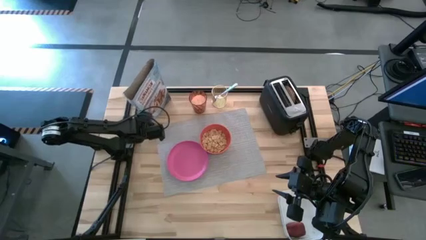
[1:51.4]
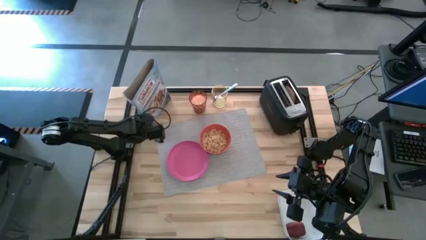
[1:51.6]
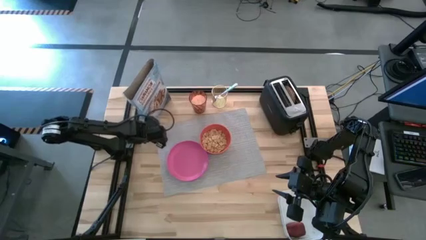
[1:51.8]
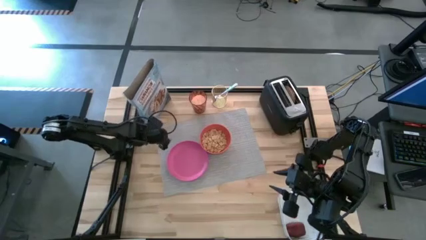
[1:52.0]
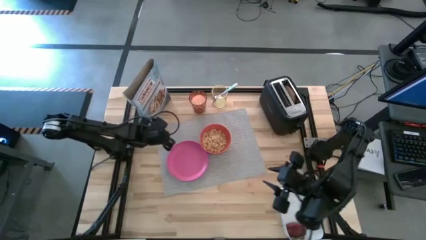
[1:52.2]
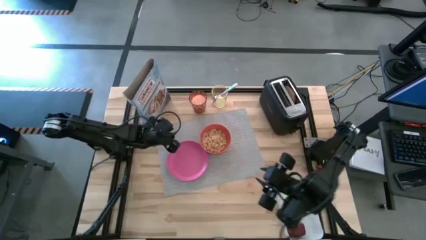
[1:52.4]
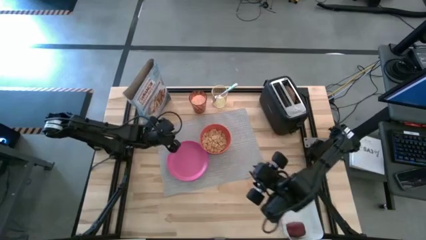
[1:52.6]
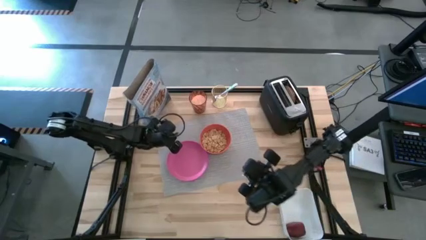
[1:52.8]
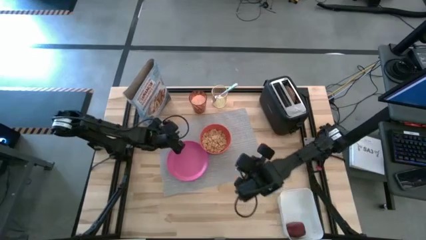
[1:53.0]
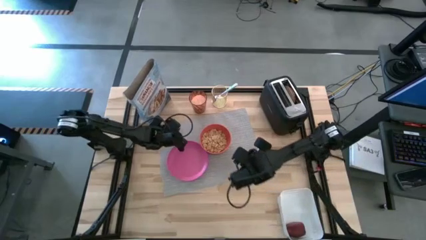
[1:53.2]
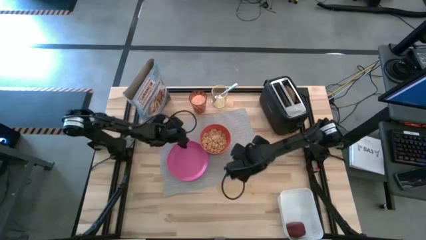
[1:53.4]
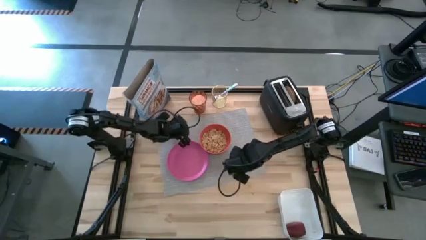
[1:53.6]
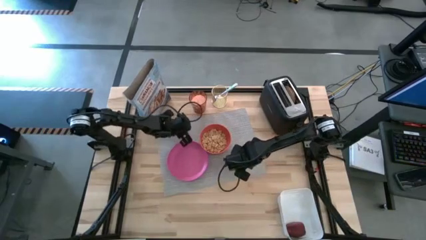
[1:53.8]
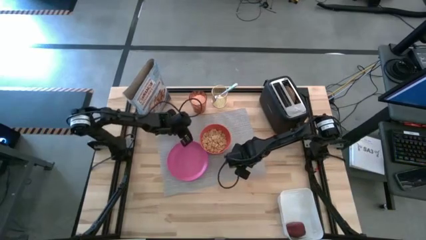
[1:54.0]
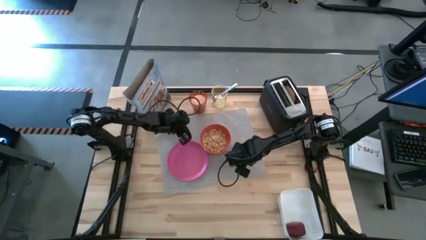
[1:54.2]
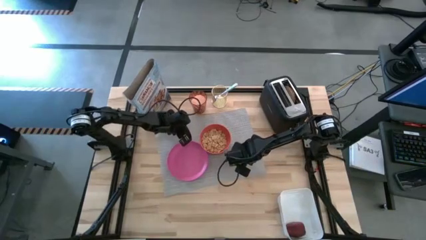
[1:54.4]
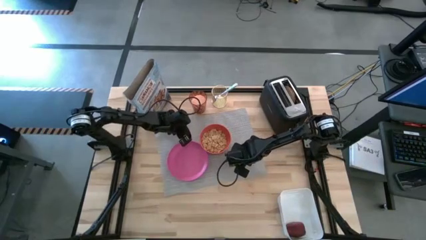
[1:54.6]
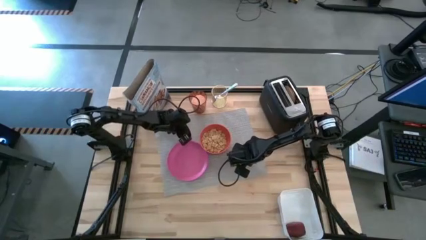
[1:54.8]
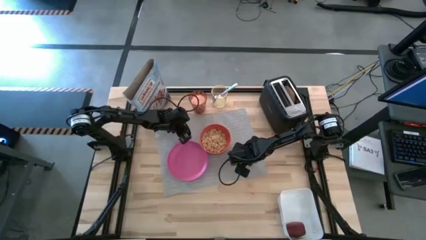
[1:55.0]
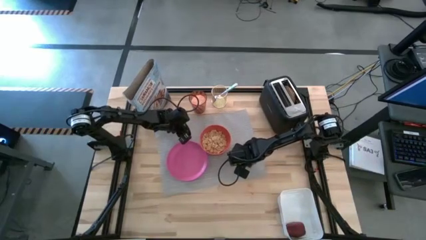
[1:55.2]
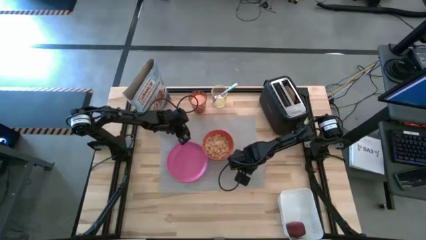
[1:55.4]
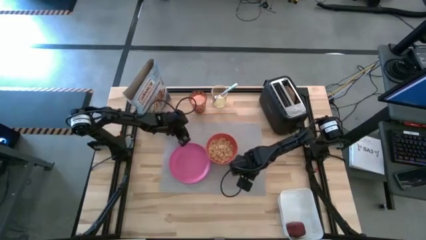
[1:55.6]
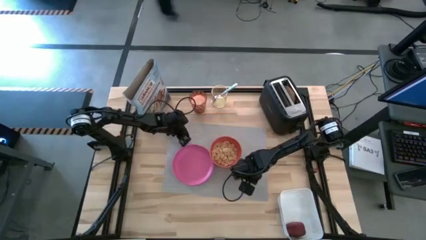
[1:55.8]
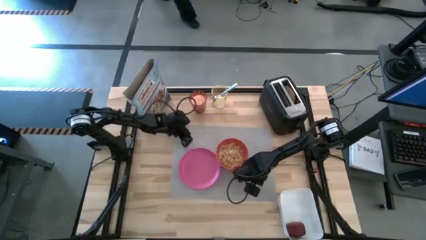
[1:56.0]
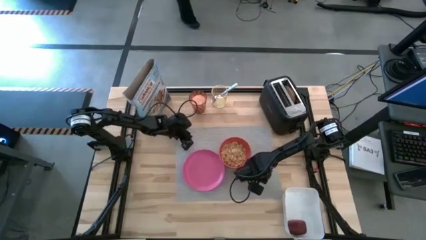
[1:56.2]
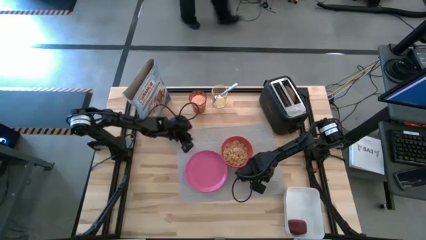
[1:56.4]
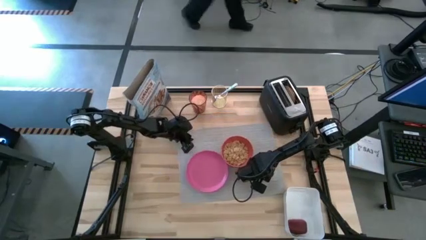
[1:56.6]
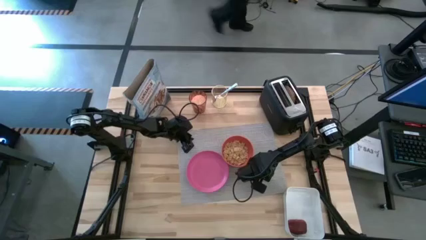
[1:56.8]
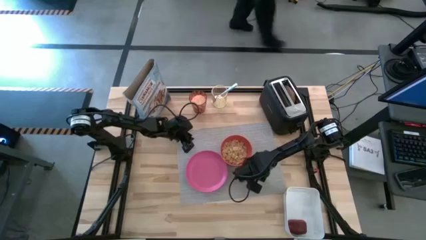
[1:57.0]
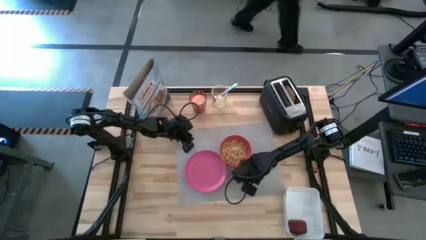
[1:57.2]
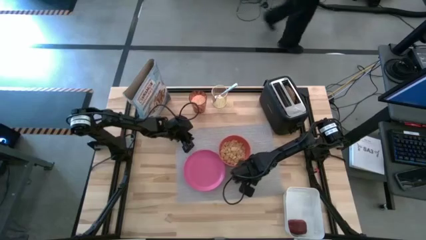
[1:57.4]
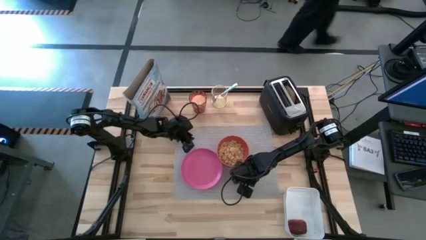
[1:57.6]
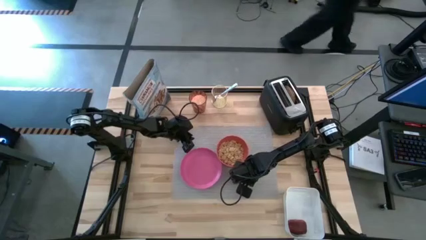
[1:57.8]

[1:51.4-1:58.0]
Task: Arrange a breakfast setting
Adjust the gray table mat

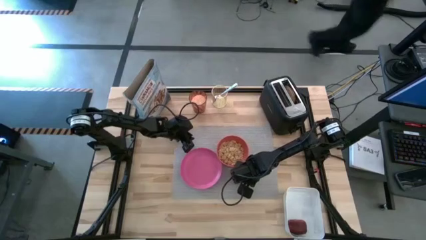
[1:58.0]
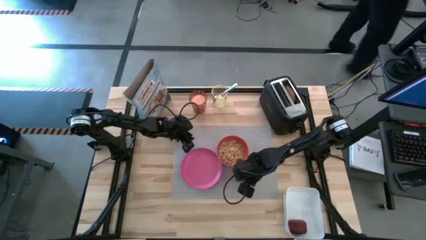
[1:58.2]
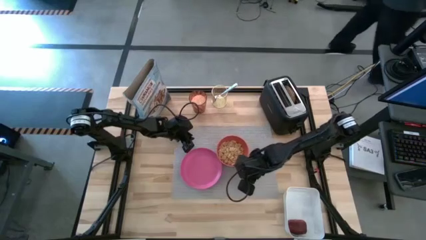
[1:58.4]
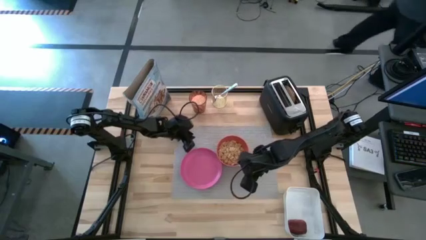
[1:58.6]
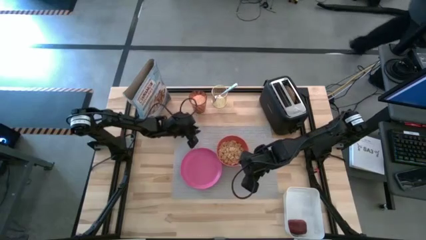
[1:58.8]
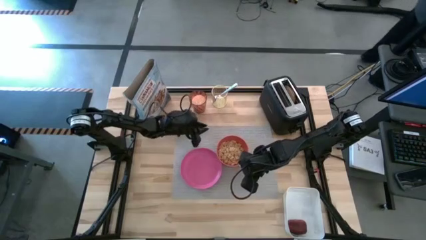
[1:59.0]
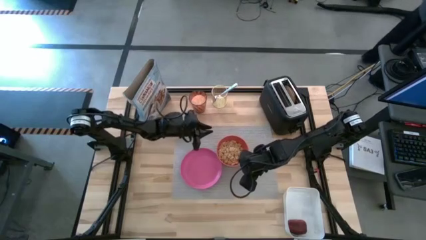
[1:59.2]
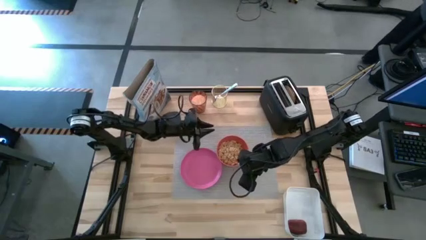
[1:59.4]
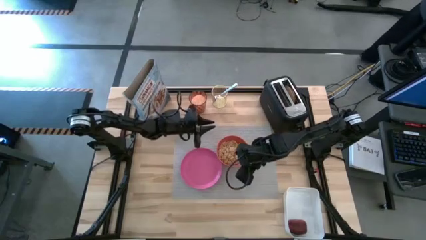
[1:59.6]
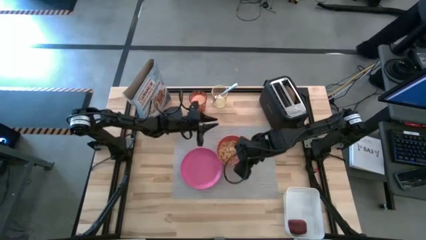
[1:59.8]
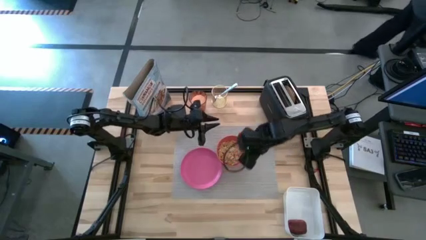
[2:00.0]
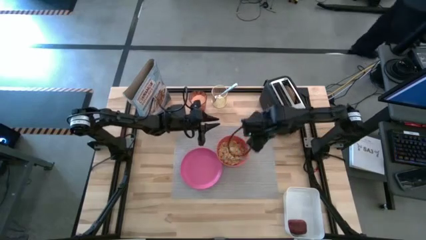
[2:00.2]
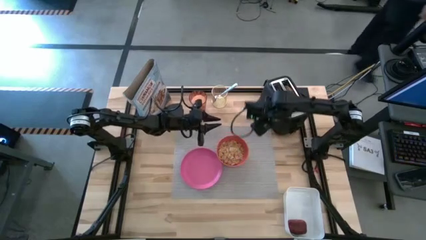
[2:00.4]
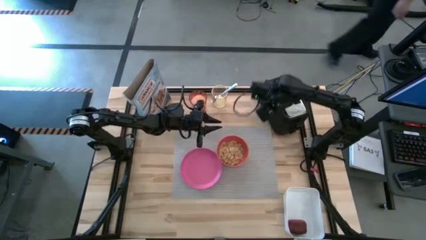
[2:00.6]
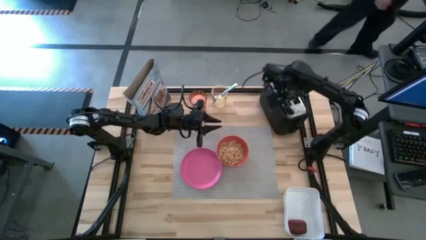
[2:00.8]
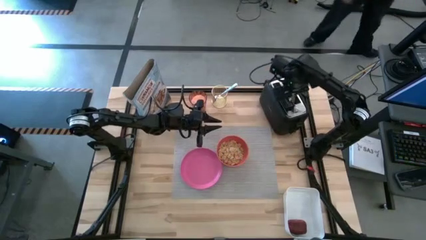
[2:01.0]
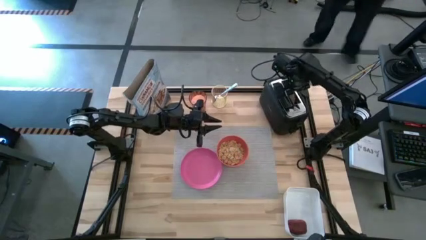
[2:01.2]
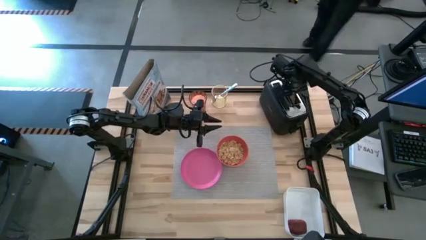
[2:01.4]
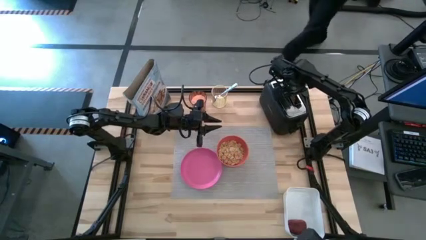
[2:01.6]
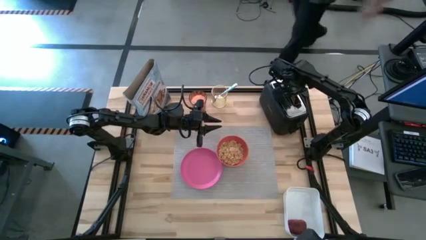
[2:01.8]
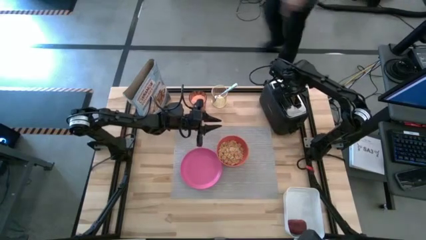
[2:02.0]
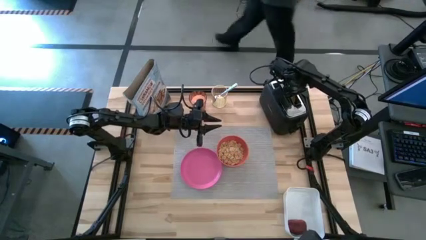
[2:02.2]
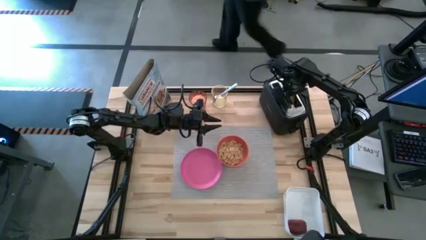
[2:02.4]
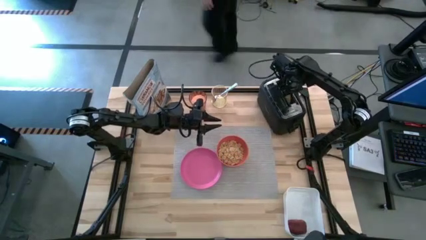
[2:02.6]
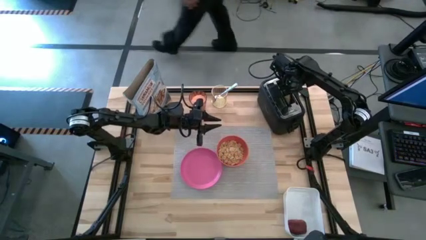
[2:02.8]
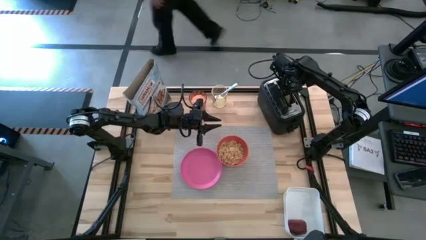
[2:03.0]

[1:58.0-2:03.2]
Put the bread on the pink plate
